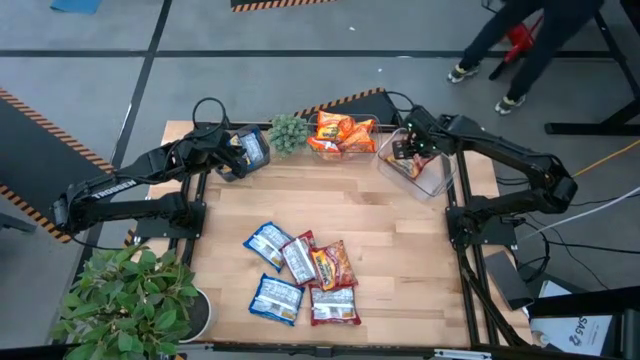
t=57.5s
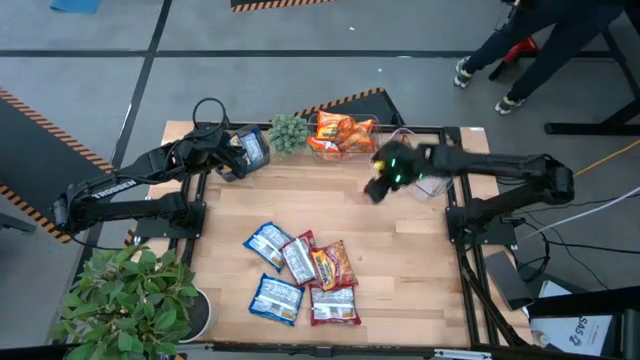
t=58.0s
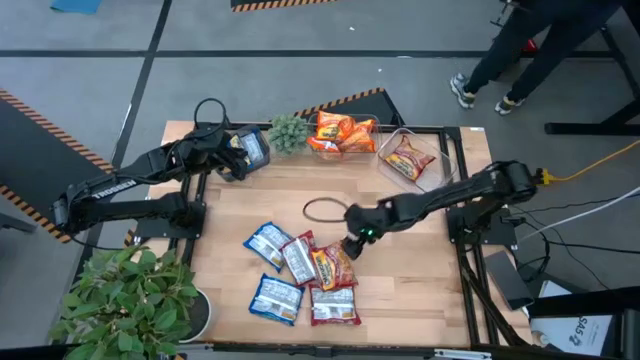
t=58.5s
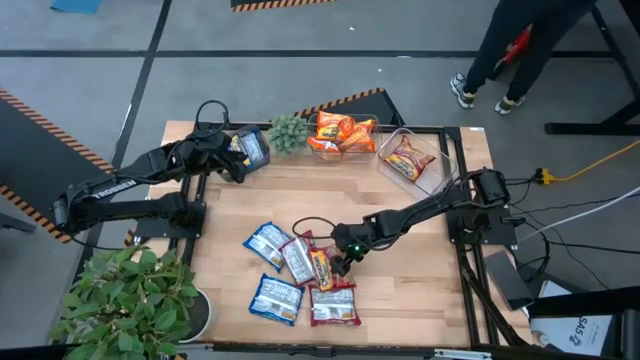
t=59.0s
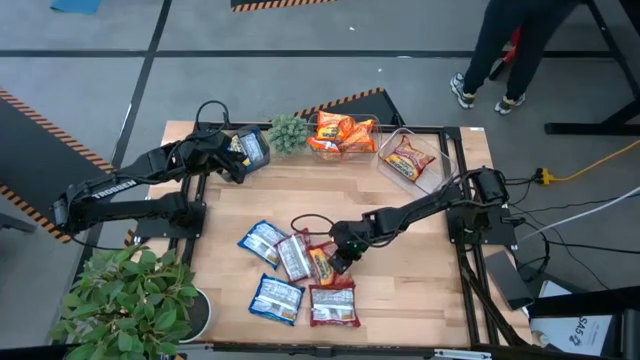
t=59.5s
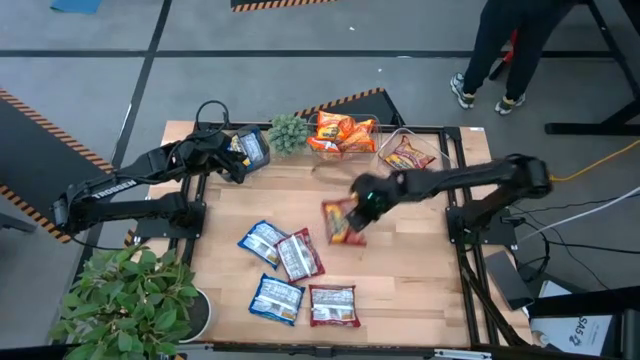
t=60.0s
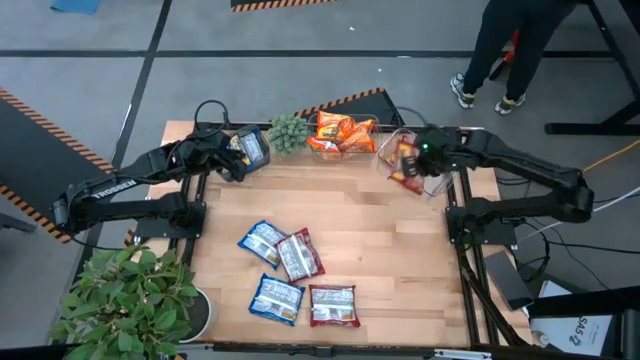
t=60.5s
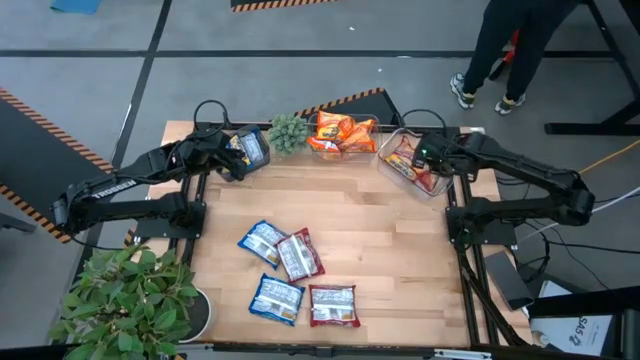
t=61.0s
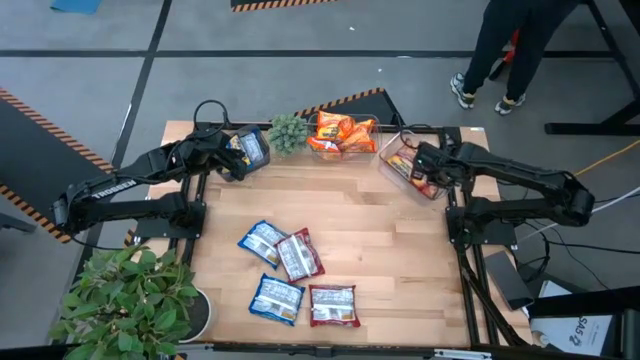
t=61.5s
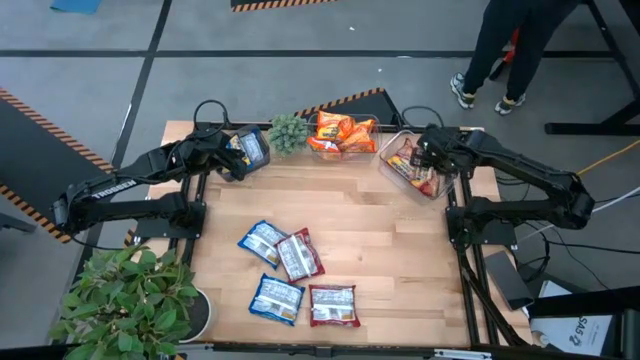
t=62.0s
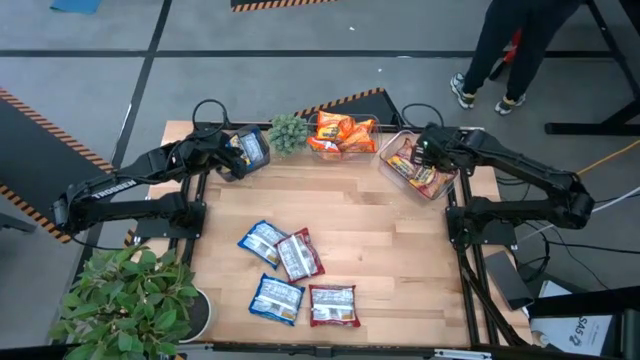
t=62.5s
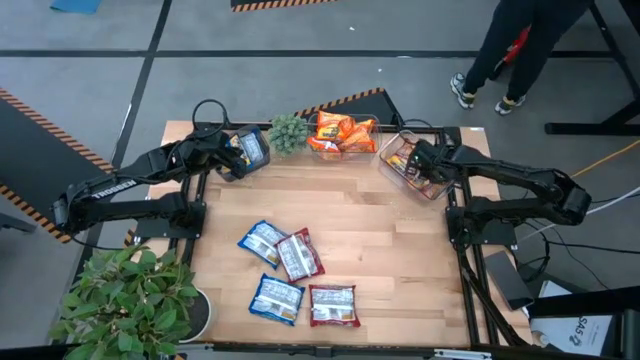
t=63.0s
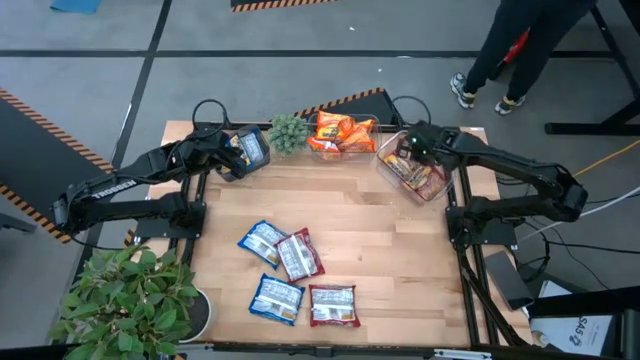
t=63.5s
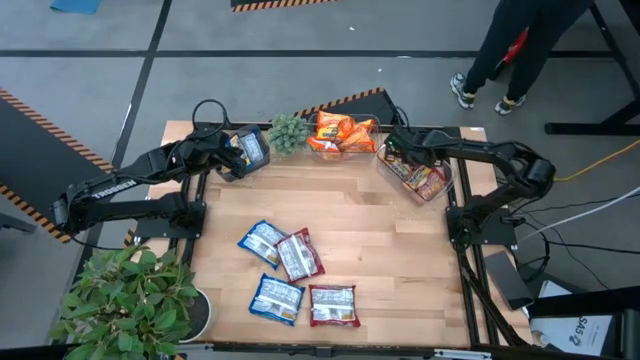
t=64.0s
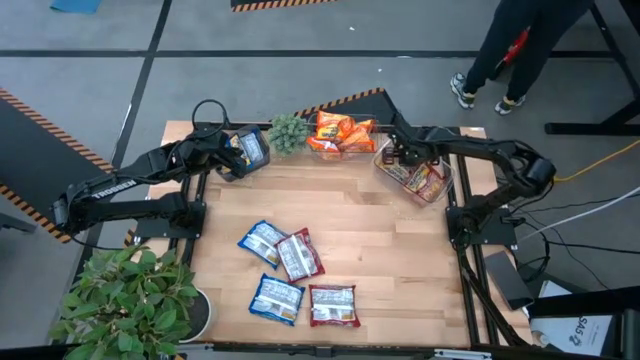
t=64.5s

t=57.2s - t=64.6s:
Task: Sort Maruchan noodles
Put the red noodle pack into the right transparent bin

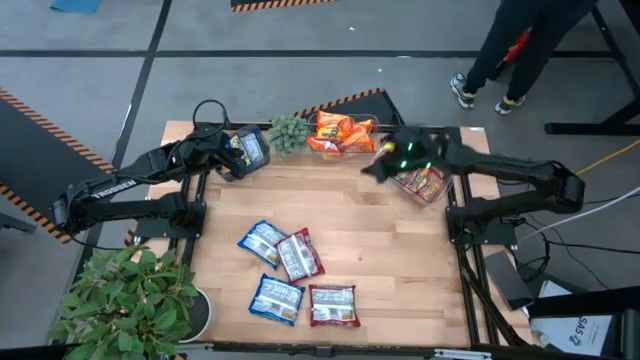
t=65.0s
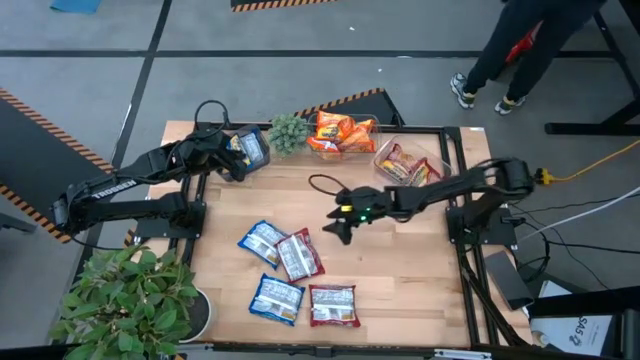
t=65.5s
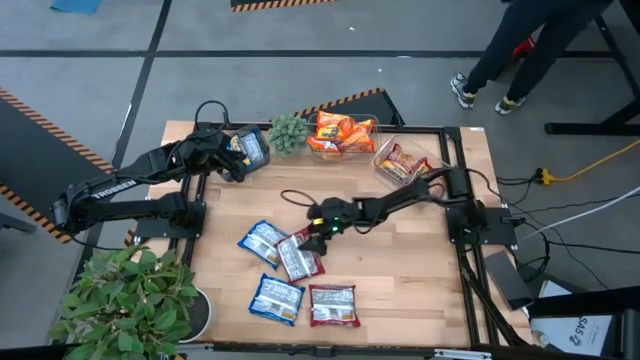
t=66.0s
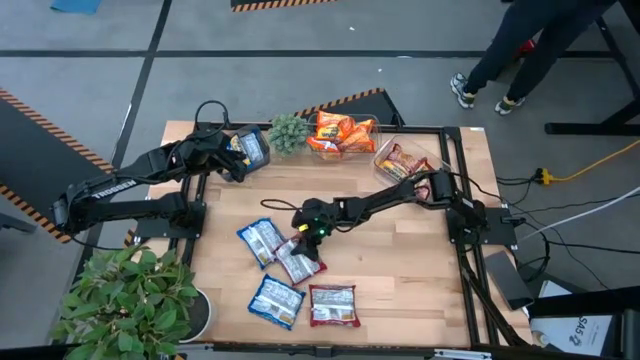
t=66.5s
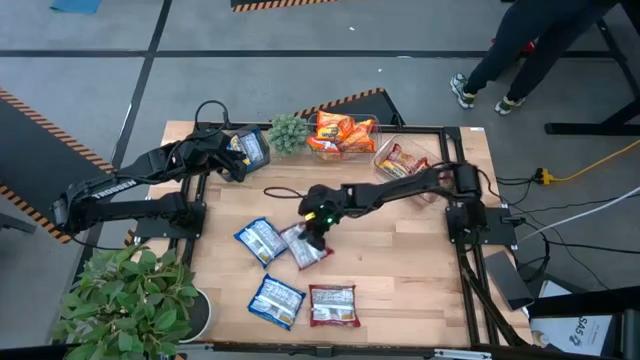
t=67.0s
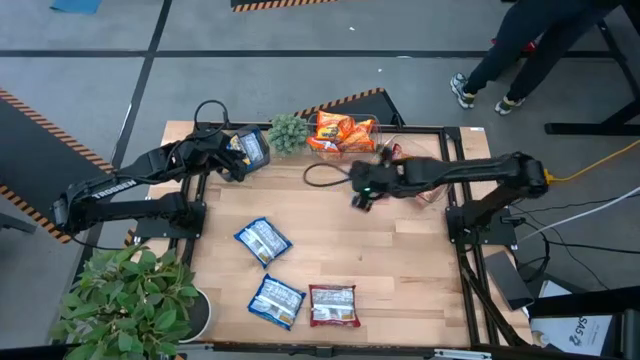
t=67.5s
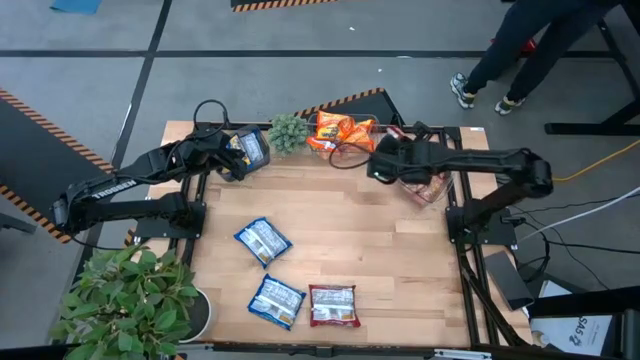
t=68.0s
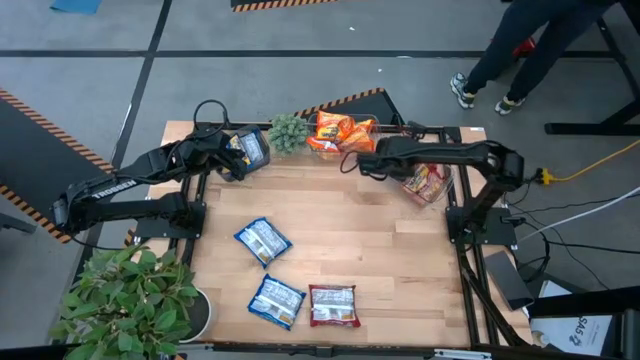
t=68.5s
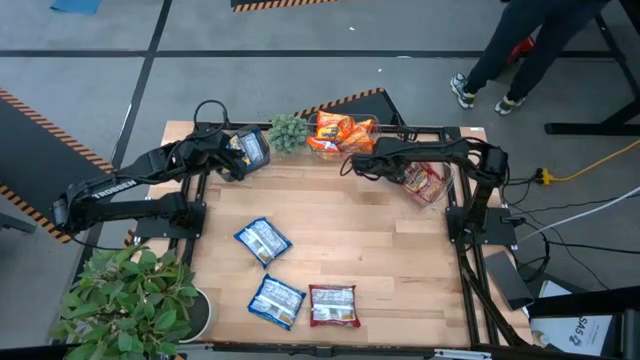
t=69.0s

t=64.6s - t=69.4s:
Put the red noodle pack into the right transparent bin

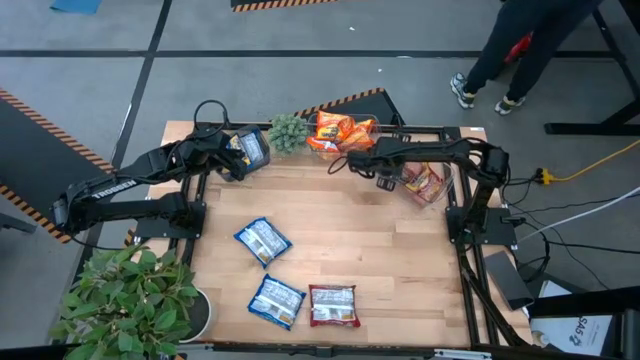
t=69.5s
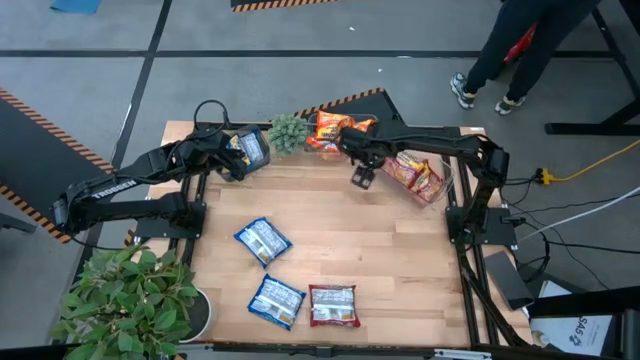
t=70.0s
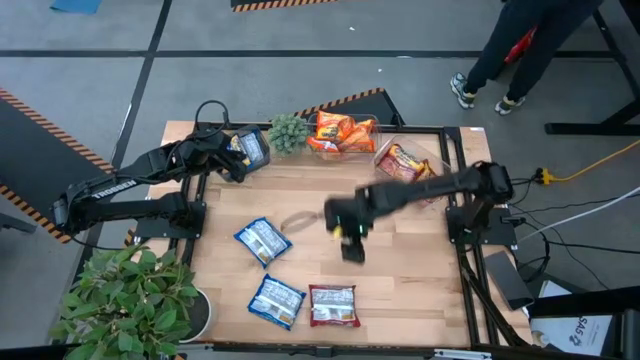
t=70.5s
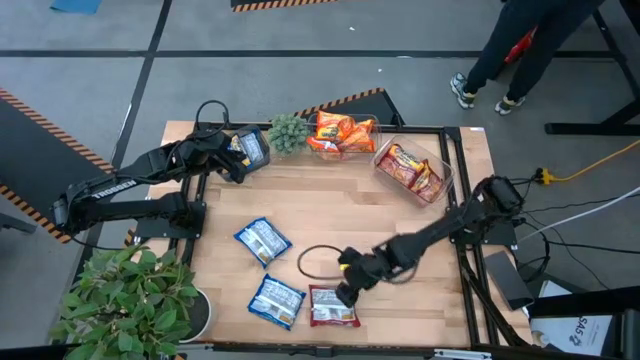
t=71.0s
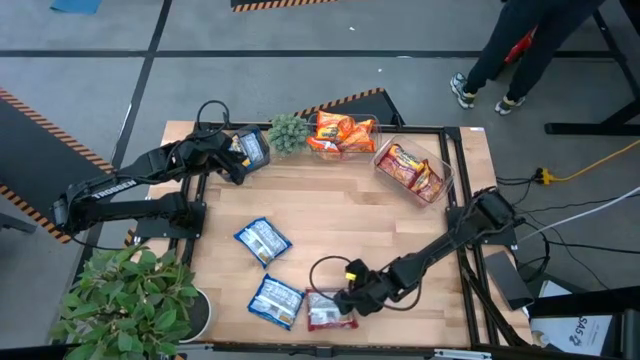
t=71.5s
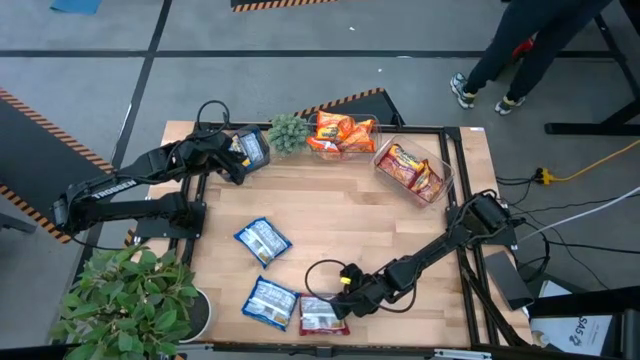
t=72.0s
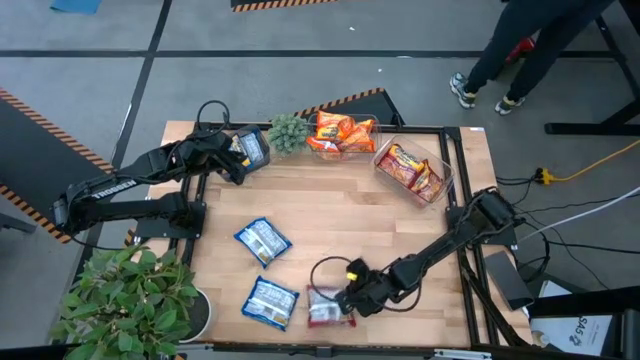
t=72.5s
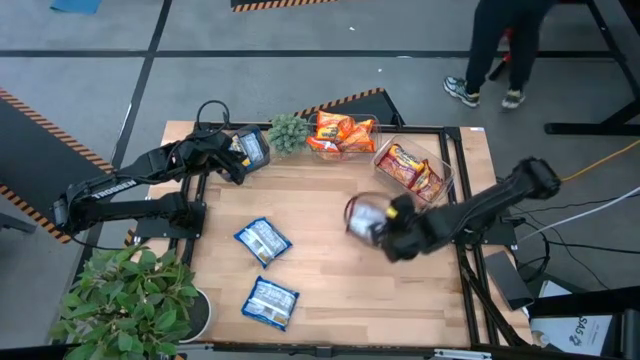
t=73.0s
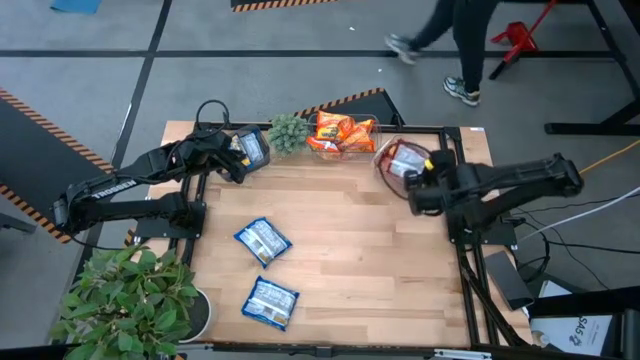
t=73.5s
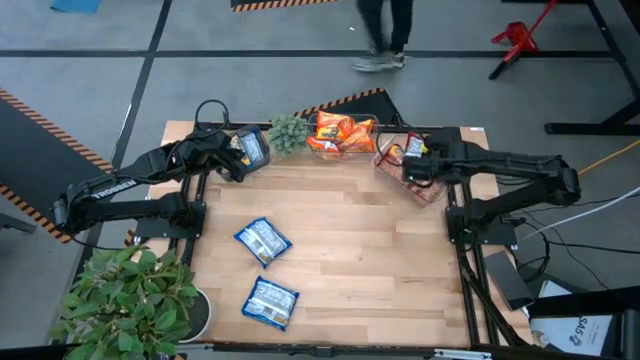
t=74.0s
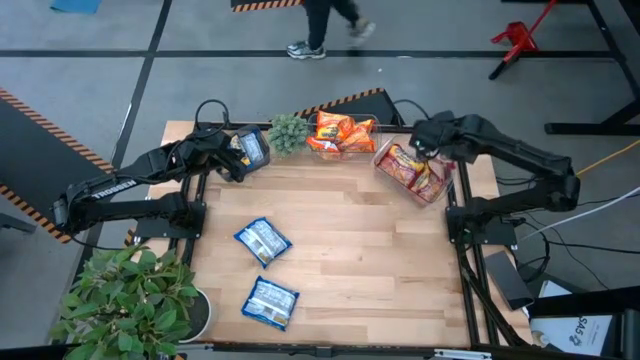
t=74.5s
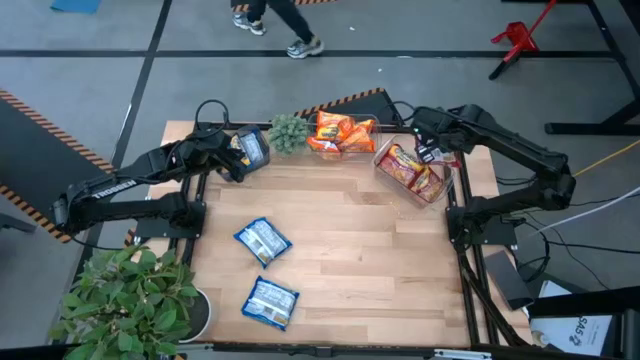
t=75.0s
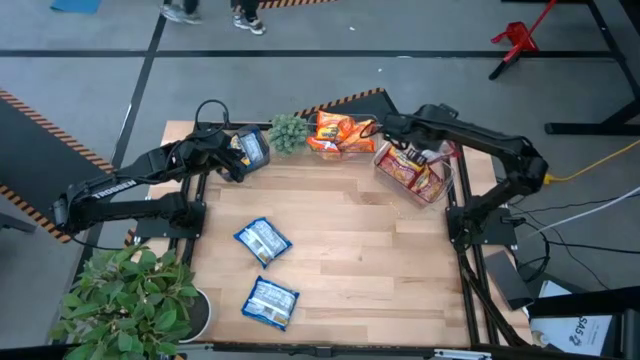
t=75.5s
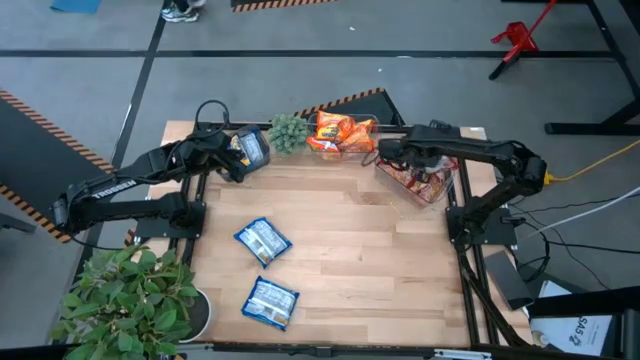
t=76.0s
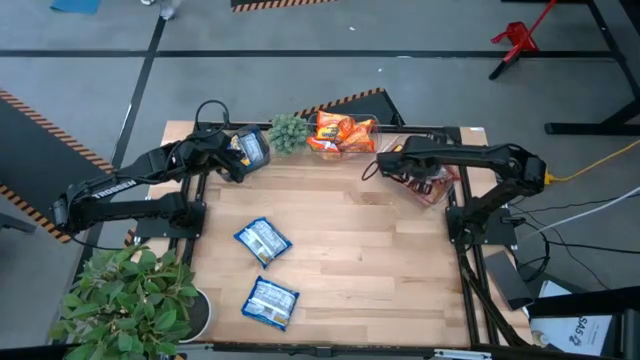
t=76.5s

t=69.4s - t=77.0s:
Put the red noodle pack into the right transparent bin
